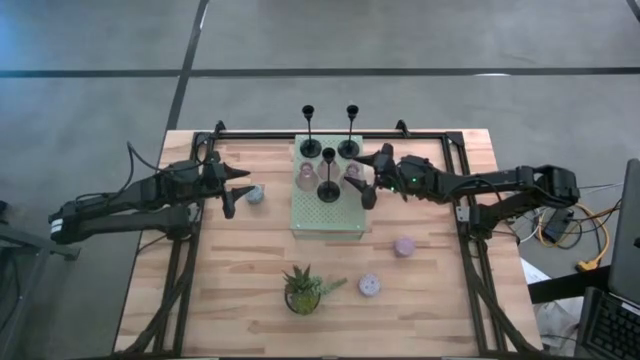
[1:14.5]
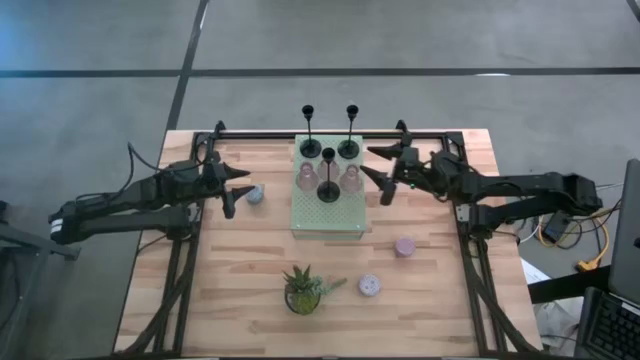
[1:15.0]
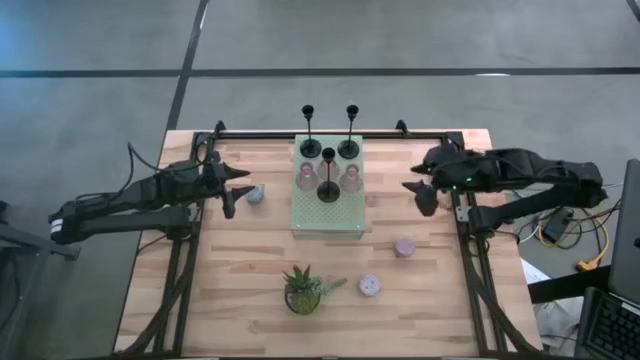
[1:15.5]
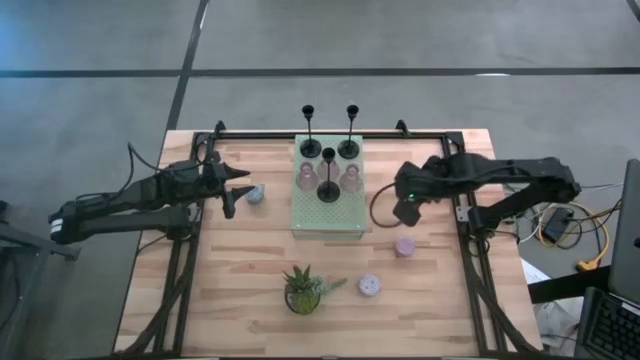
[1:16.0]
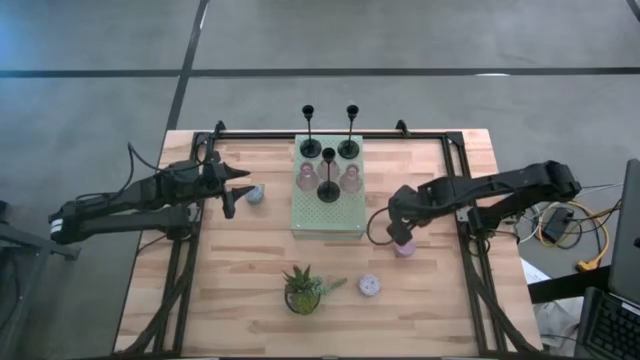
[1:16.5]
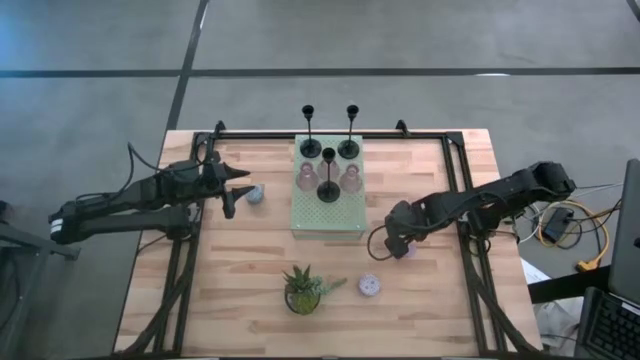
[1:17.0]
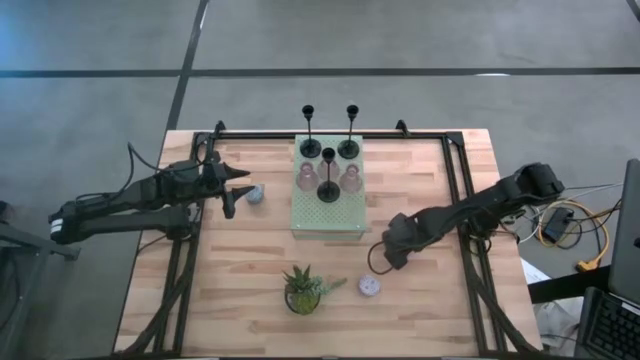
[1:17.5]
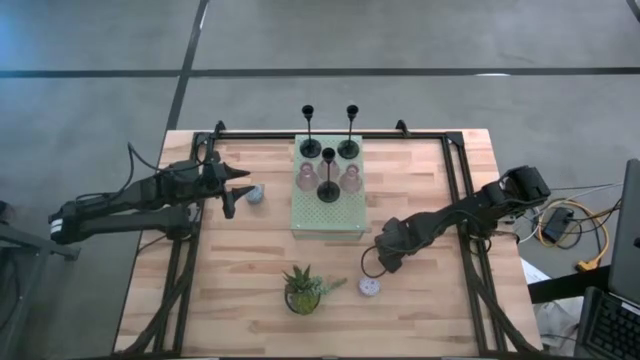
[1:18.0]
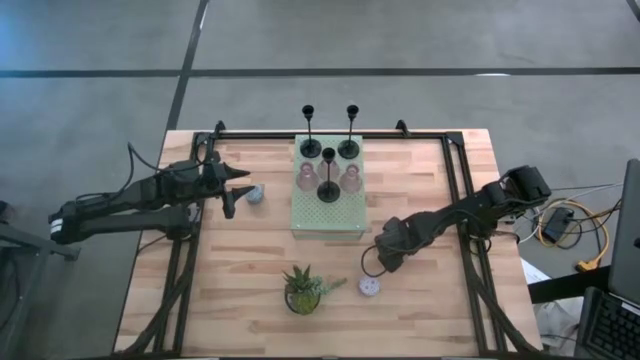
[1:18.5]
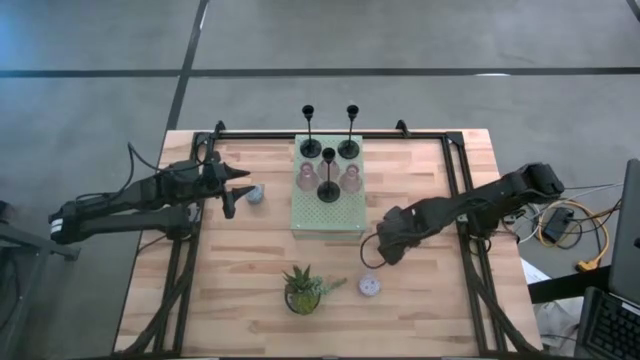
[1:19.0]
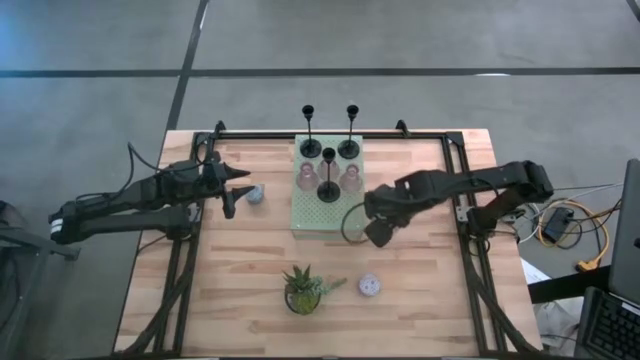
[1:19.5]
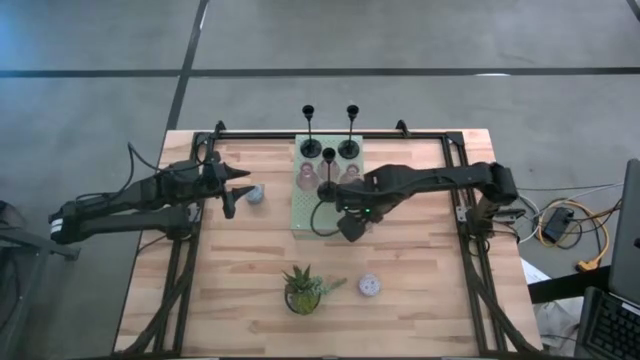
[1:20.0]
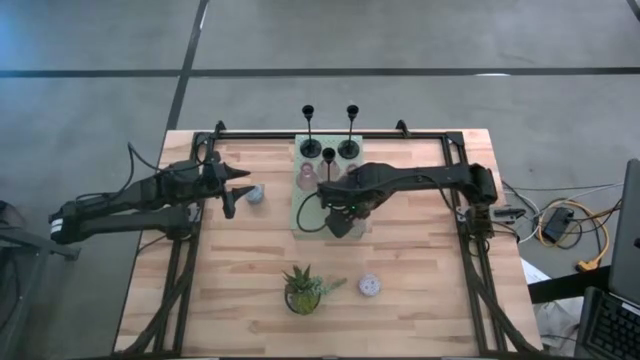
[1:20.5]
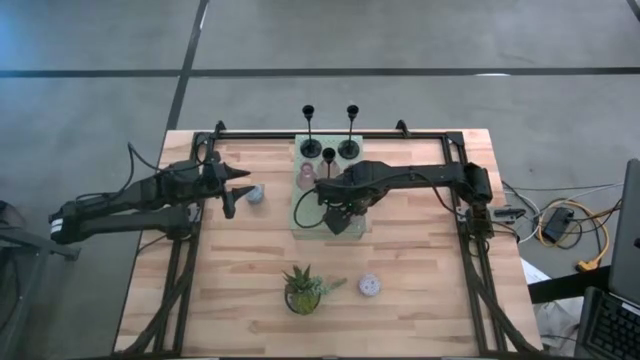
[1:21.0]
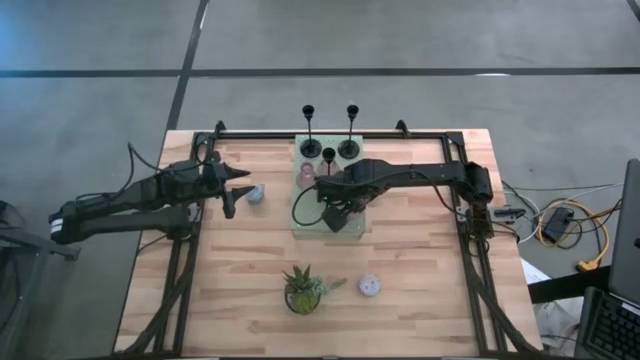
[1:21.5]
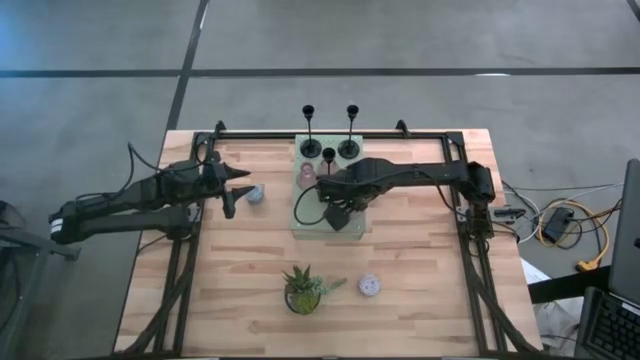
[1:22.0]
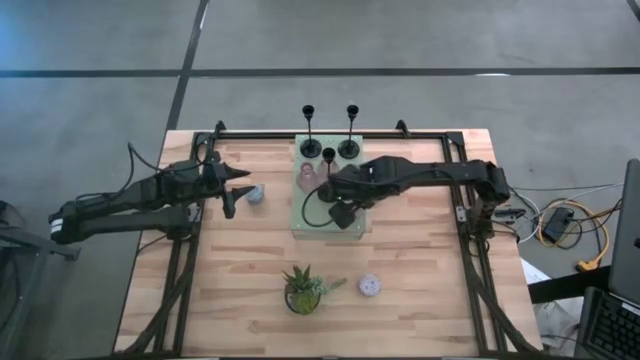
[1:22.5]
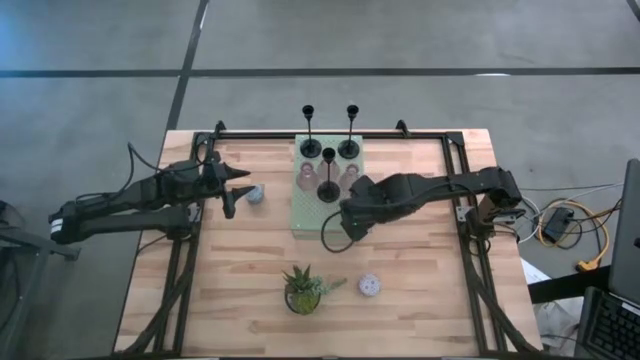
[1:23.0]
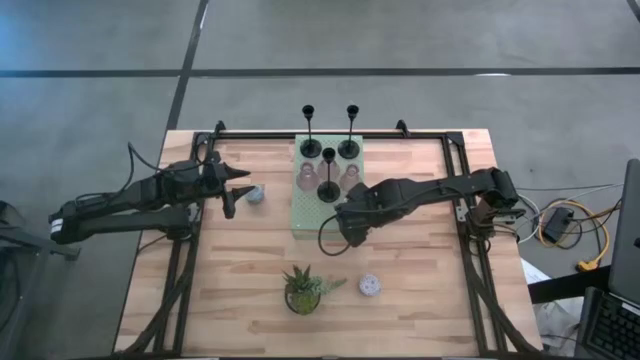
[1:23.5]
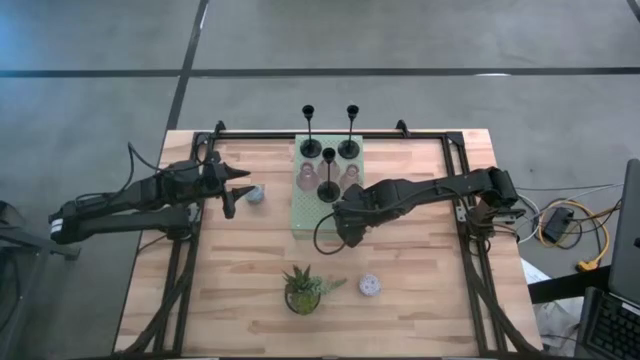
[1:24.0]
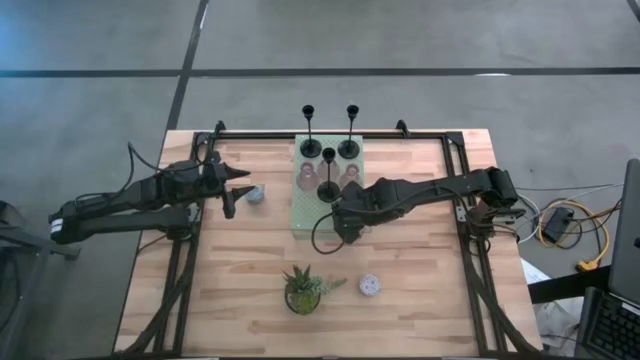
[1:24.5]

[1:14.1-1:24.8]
Task: Pick & Place candle stick holders
Put the pink scented candle on the shelf

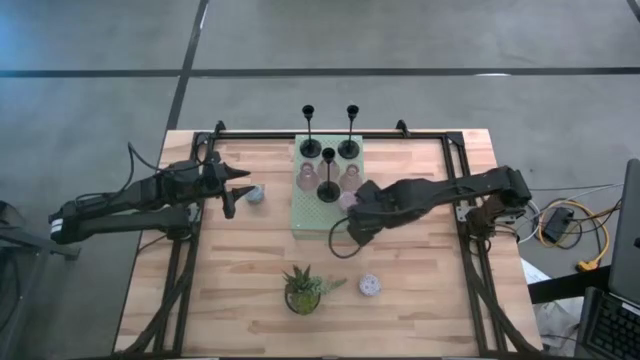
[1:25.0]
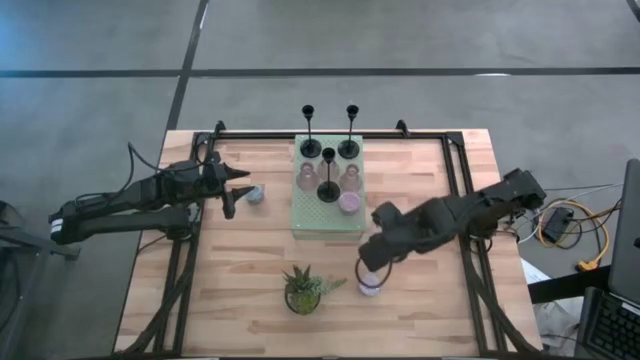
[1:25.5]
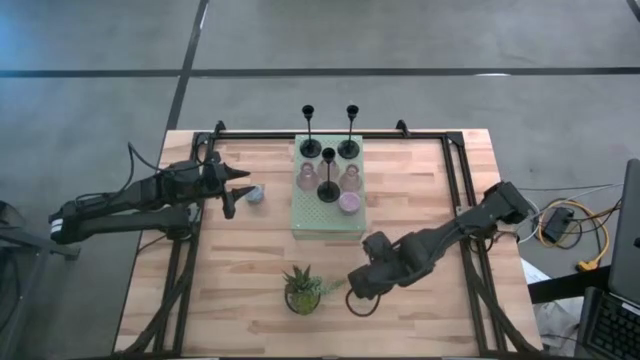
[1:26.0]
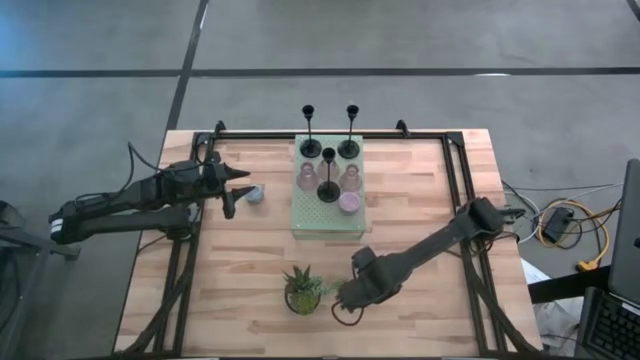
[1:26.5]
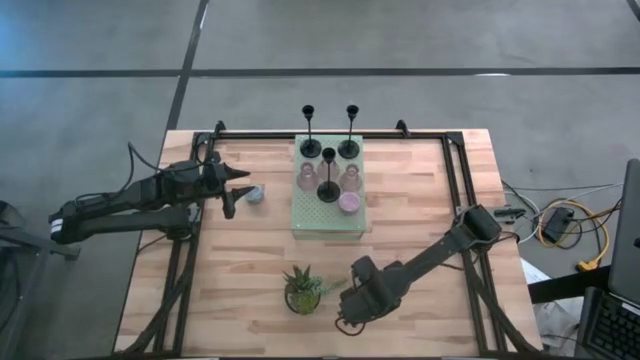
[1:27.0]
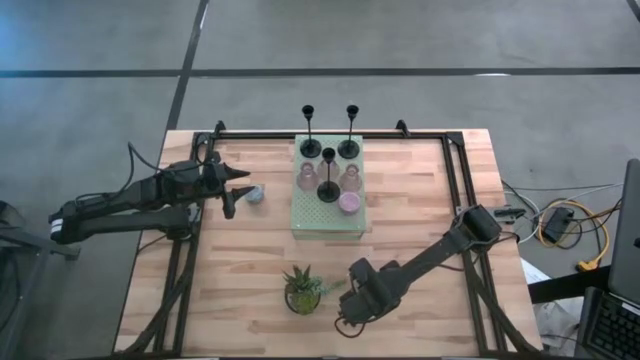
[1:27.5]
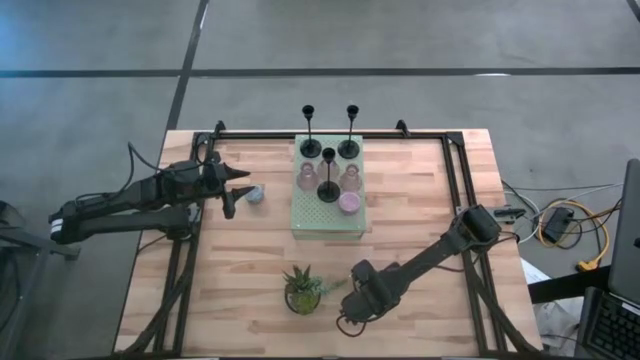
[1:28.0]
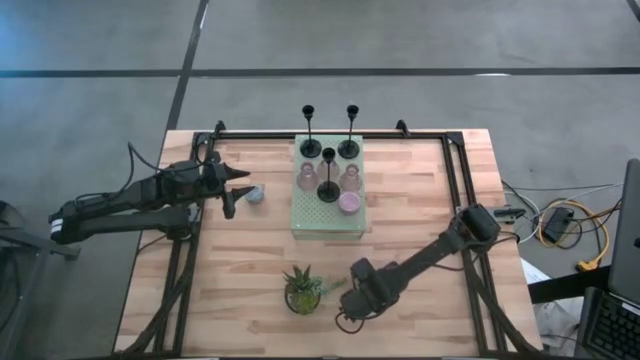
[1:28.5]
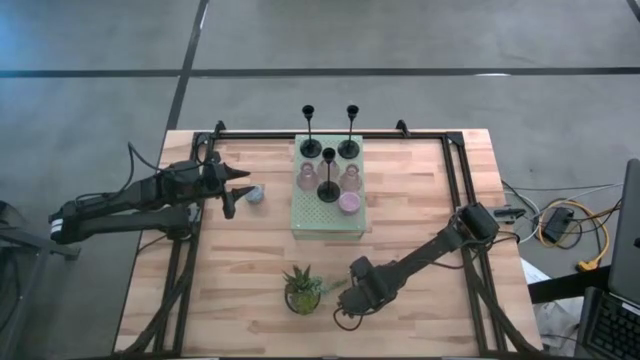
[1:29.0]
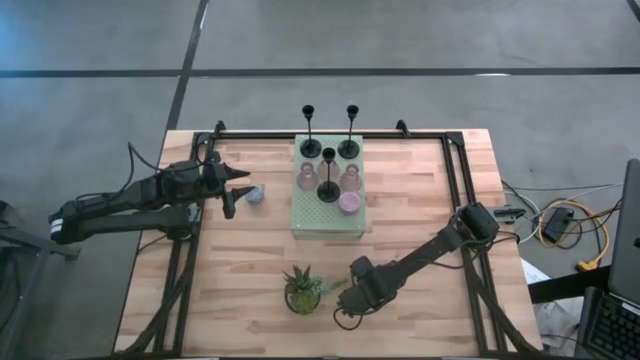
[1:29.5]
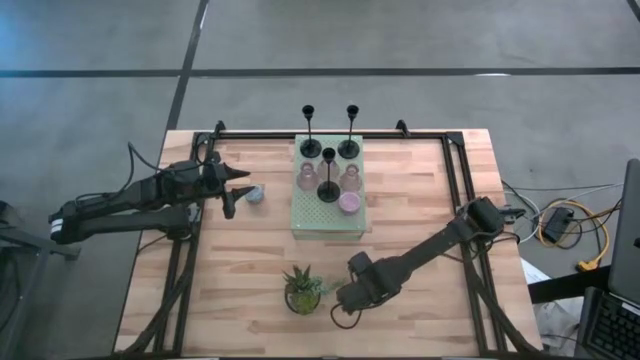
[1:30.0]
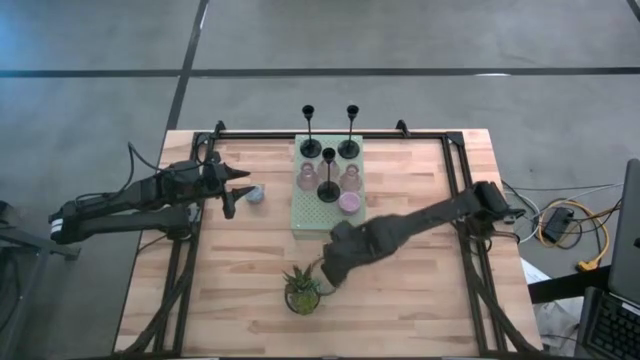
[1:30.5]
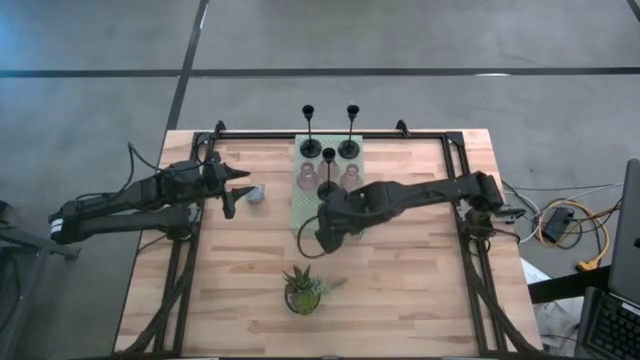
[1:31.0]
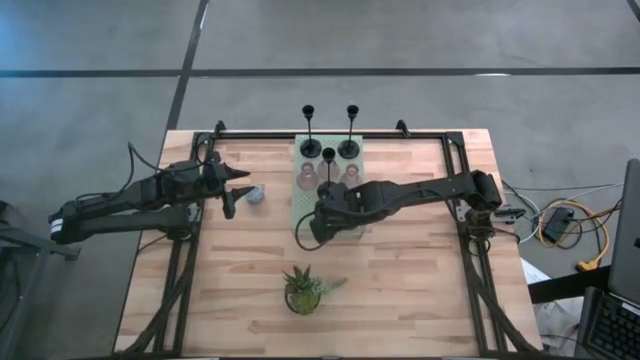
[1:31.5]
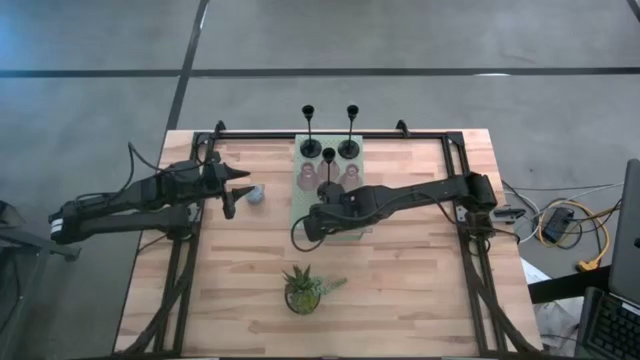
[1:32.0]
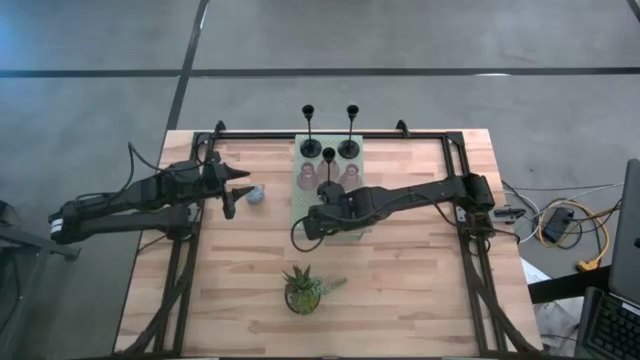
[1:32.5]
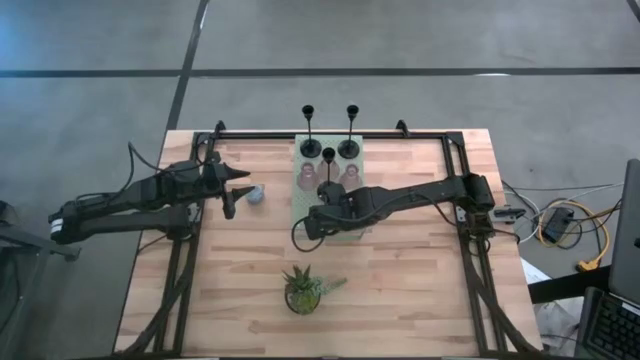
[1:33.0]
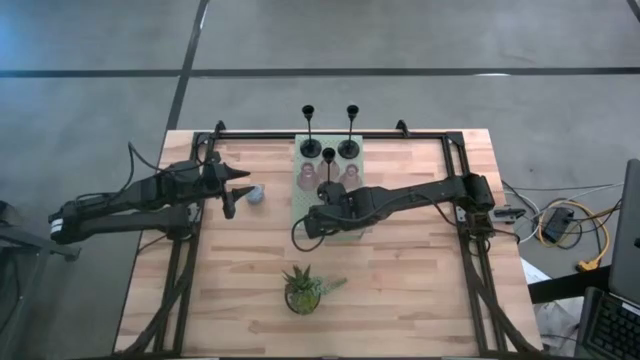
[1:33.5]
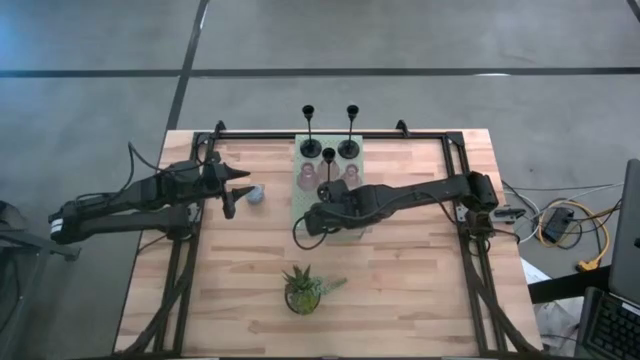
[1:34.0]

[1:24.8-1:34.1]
Put the red scented candle on the shelf

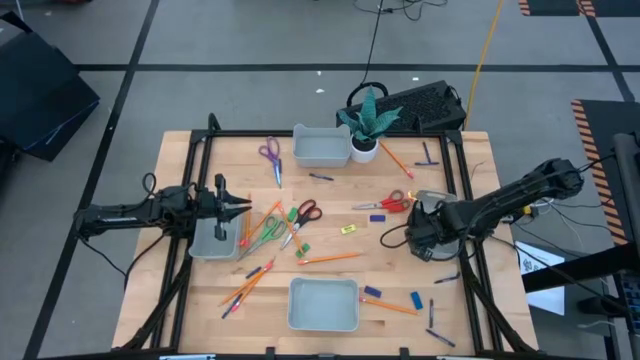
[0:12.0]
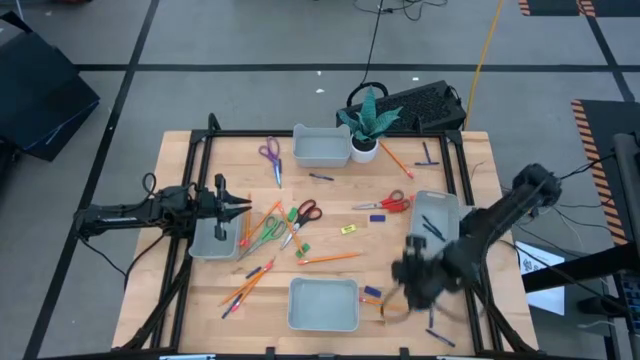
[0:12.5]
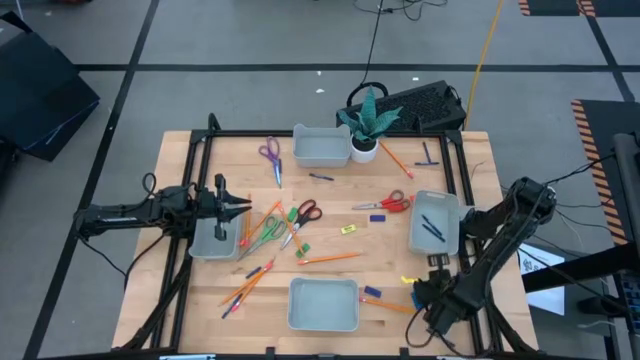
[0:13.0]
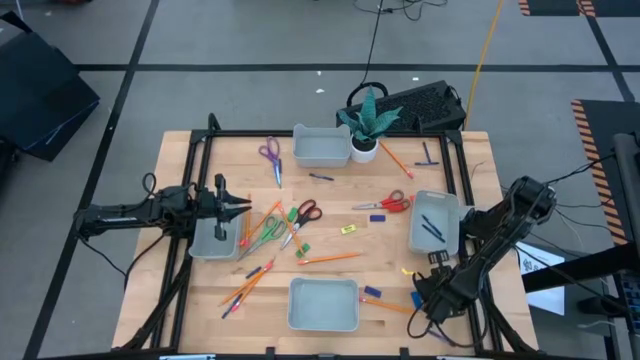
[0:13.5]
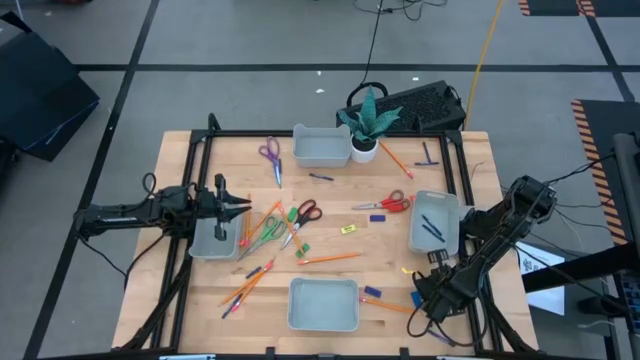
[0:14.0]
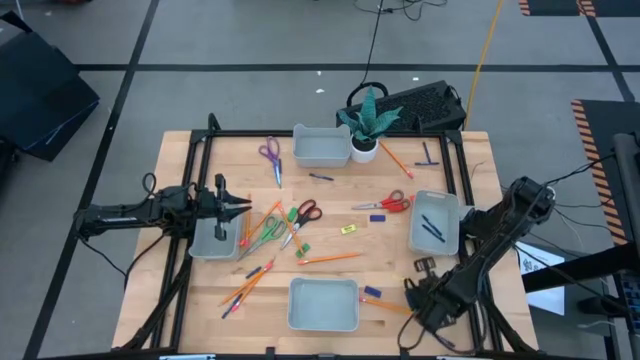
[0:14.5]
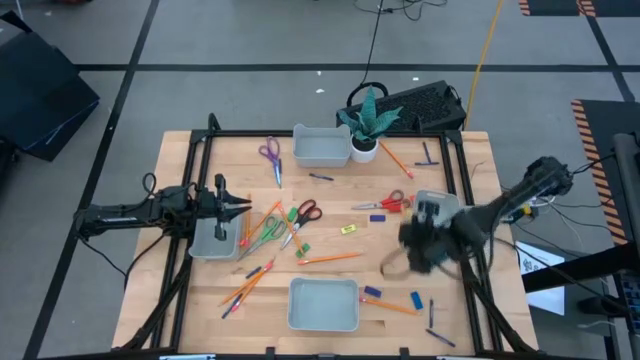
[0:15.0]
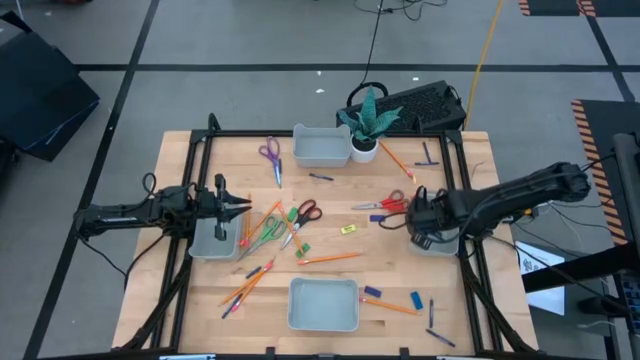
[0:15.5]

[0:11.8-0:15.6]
Task: Sort crayons/erasers/pens/pencils in bins
Put the blue crayon into the middle right gray bin
